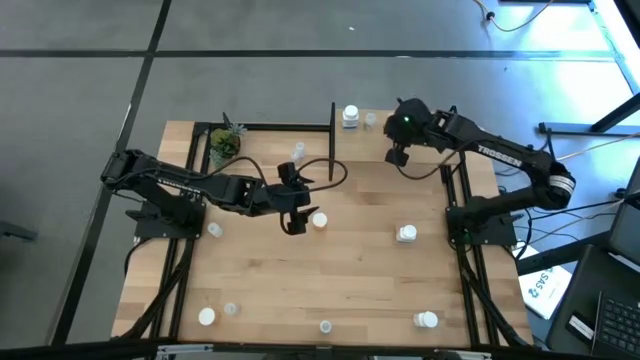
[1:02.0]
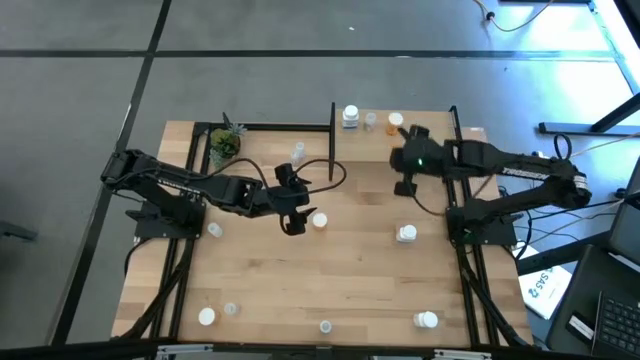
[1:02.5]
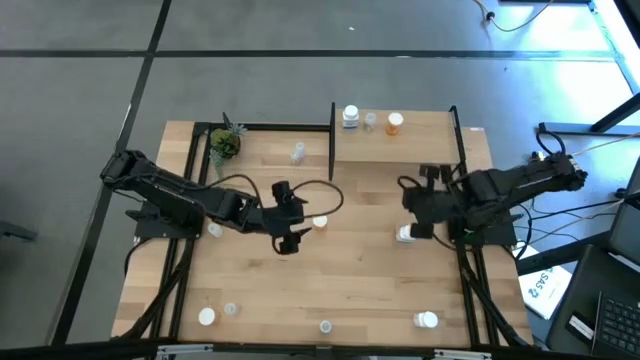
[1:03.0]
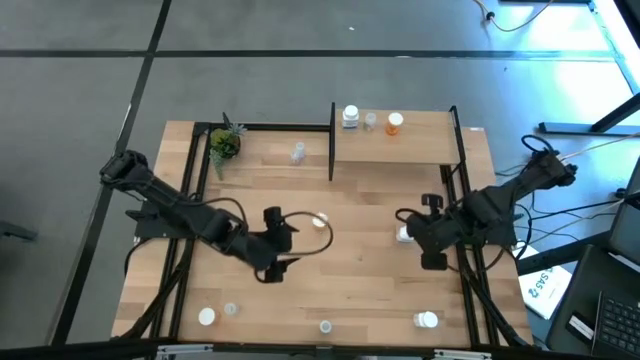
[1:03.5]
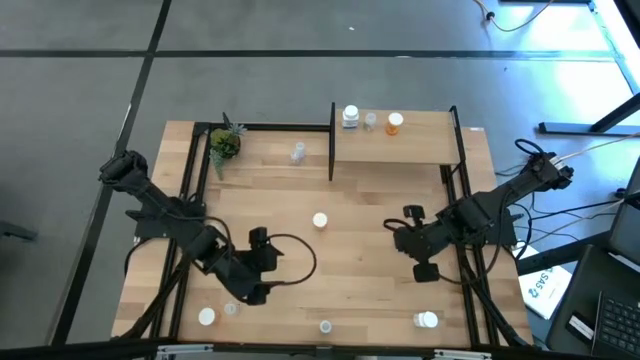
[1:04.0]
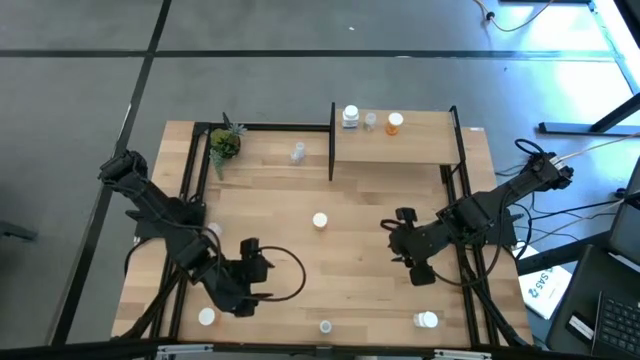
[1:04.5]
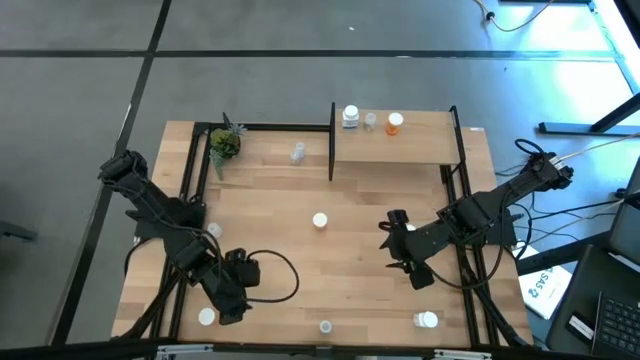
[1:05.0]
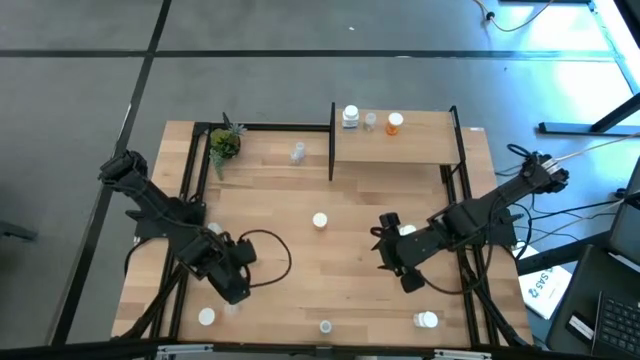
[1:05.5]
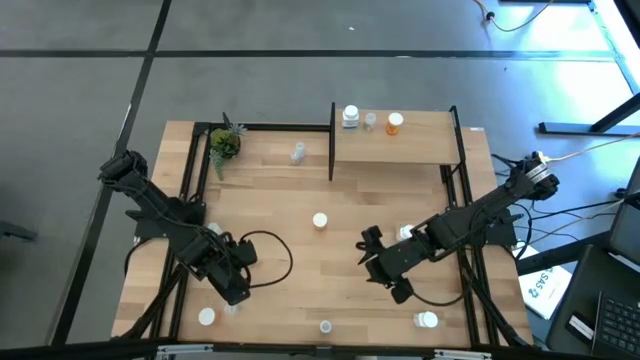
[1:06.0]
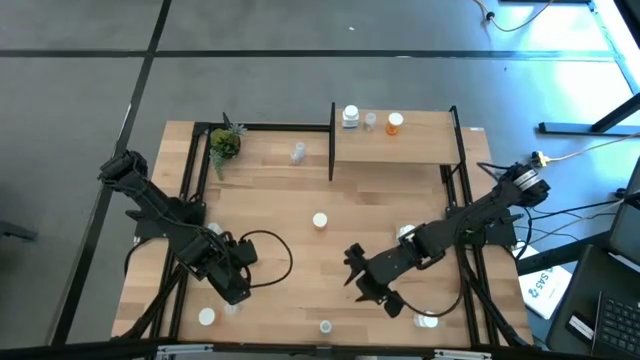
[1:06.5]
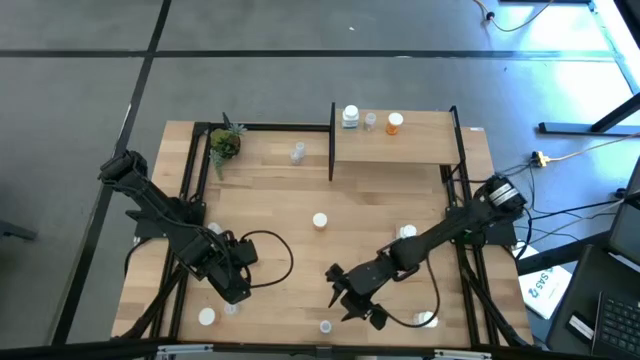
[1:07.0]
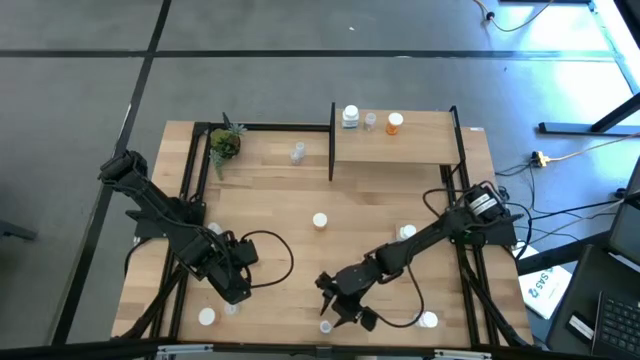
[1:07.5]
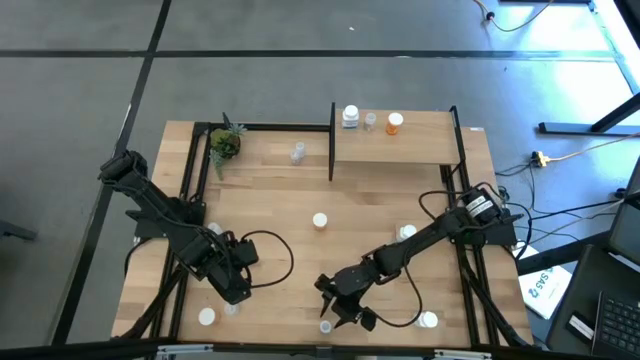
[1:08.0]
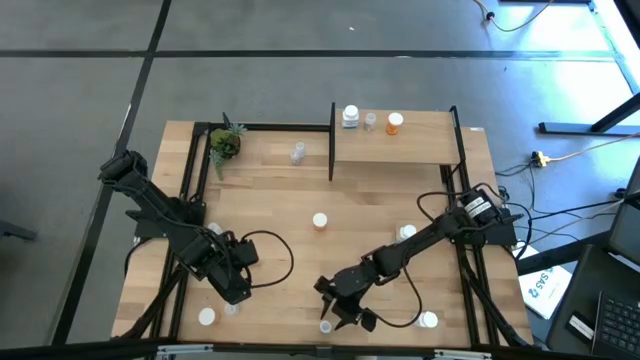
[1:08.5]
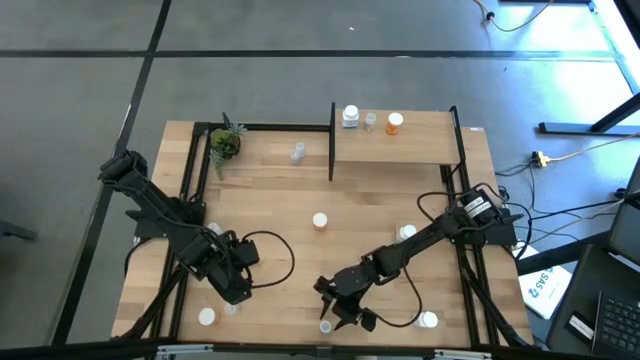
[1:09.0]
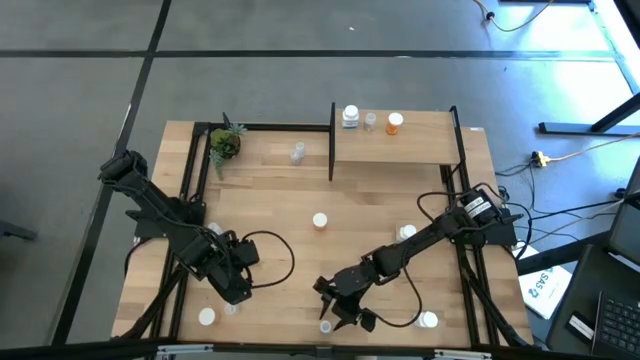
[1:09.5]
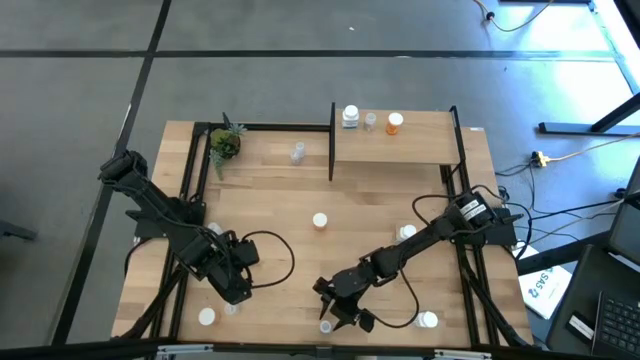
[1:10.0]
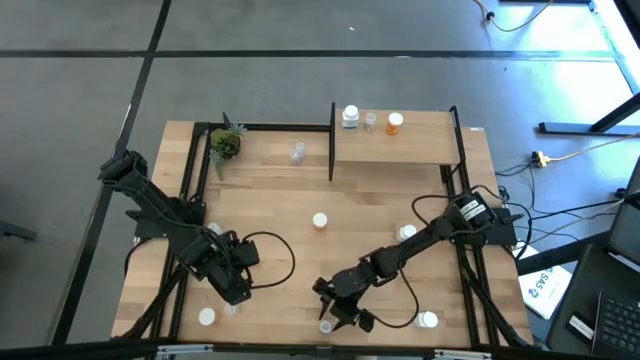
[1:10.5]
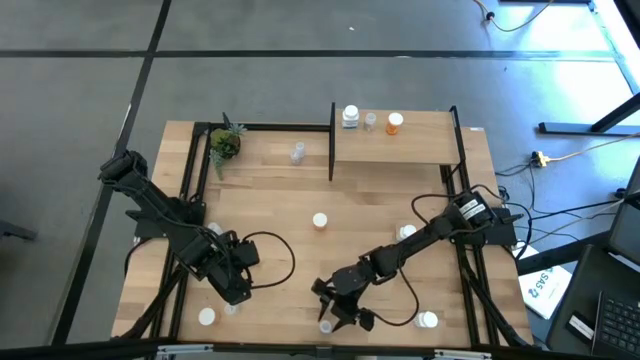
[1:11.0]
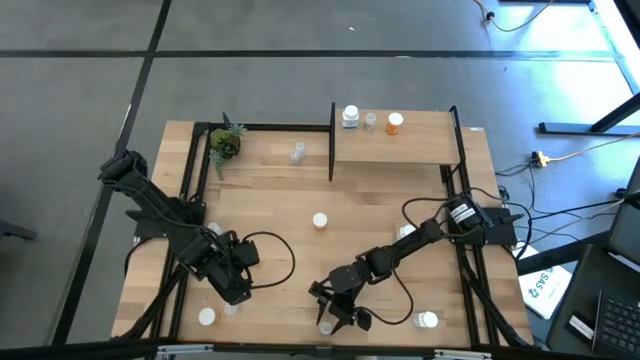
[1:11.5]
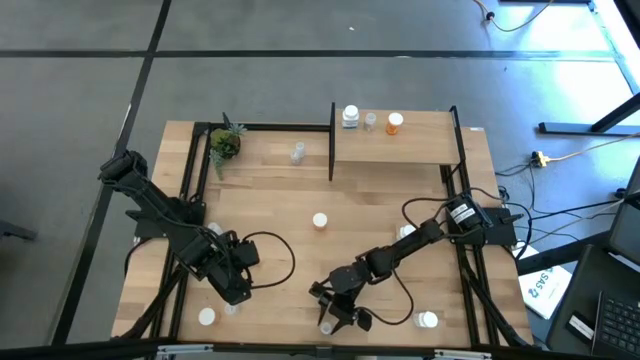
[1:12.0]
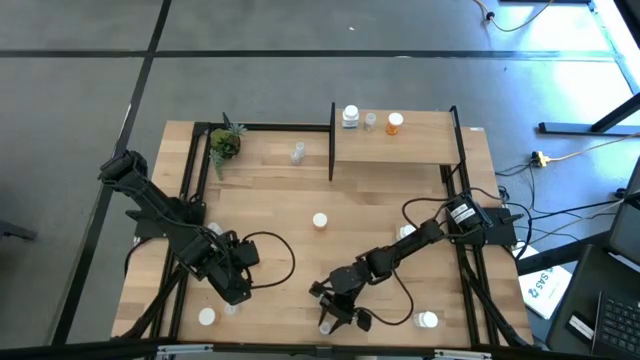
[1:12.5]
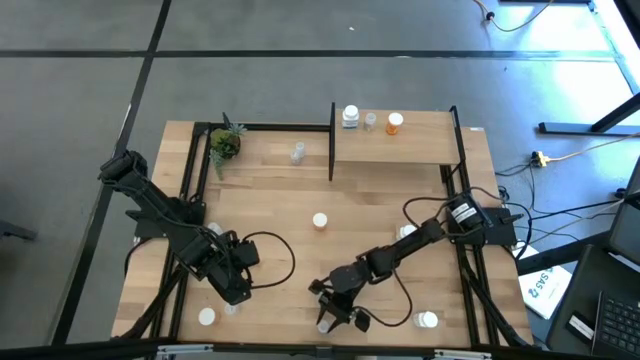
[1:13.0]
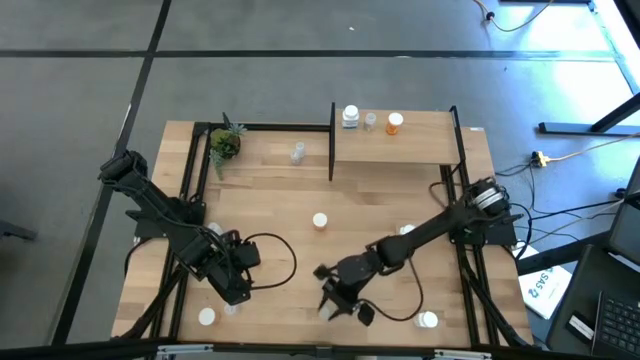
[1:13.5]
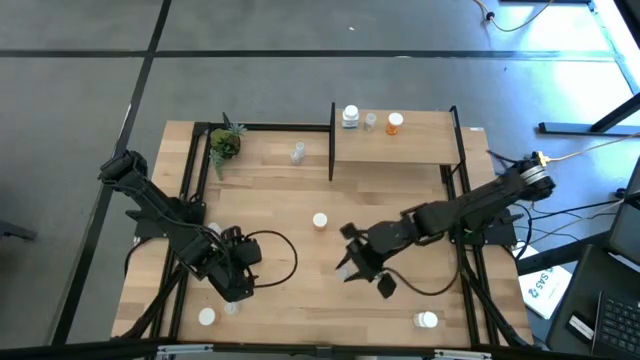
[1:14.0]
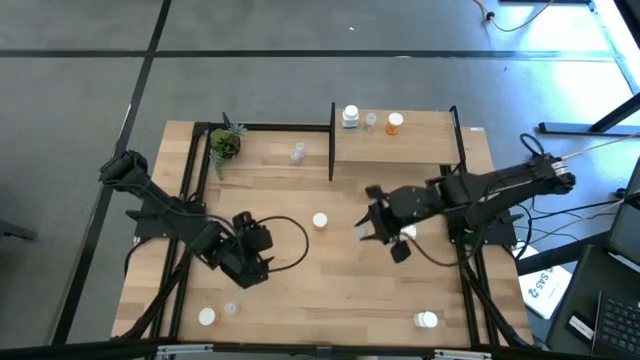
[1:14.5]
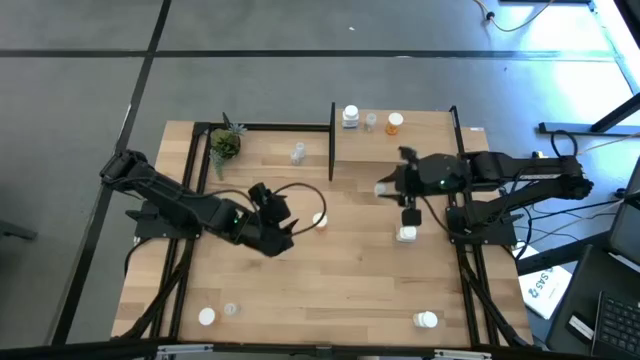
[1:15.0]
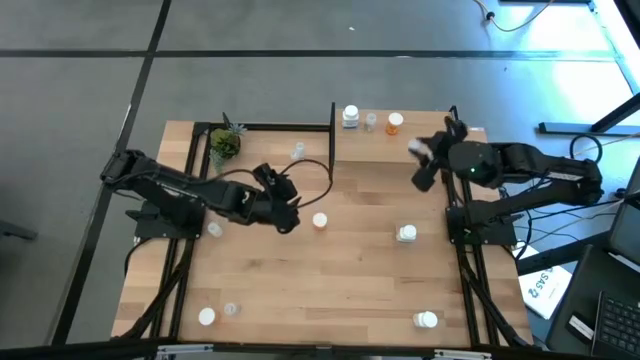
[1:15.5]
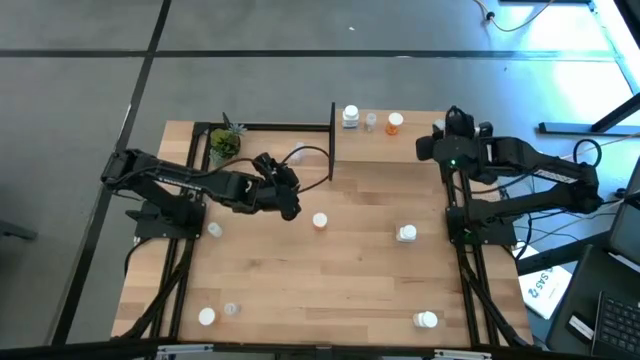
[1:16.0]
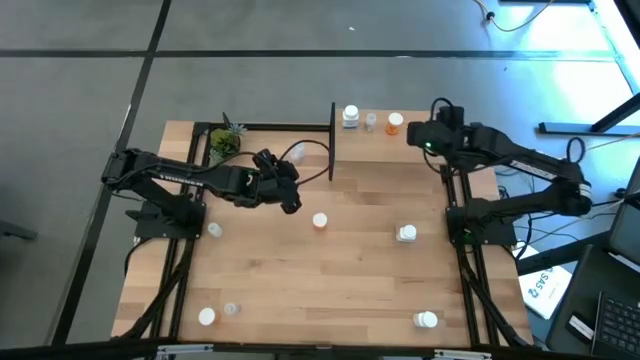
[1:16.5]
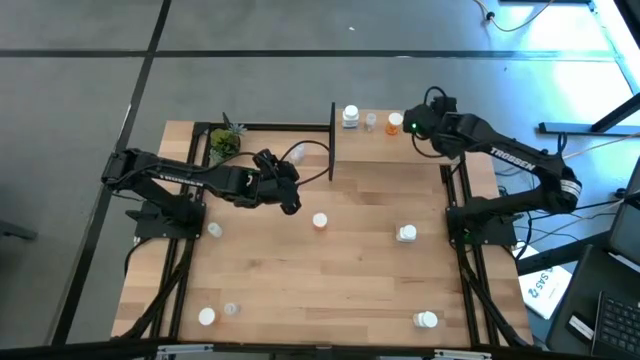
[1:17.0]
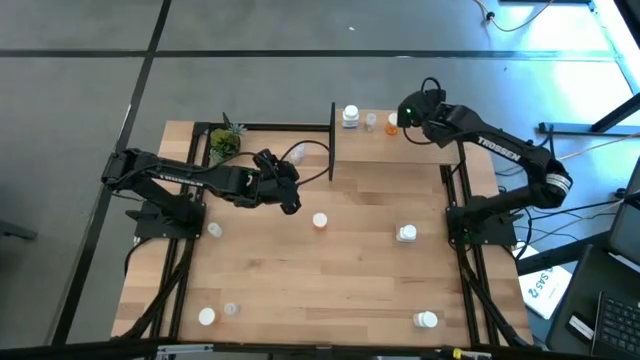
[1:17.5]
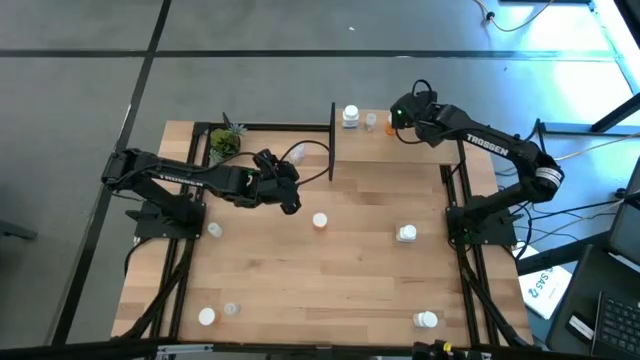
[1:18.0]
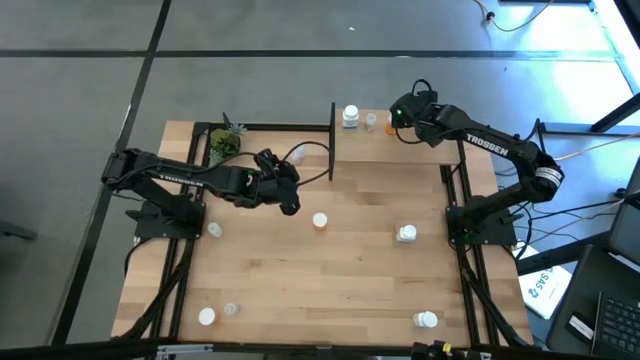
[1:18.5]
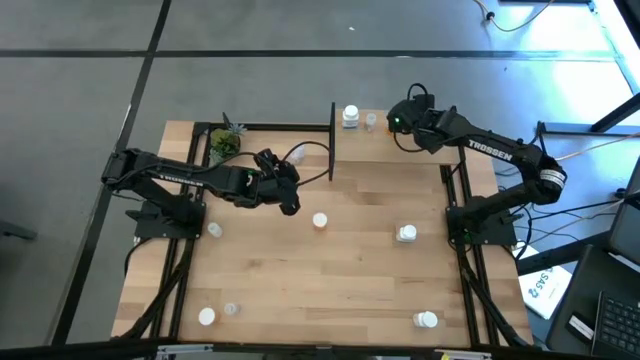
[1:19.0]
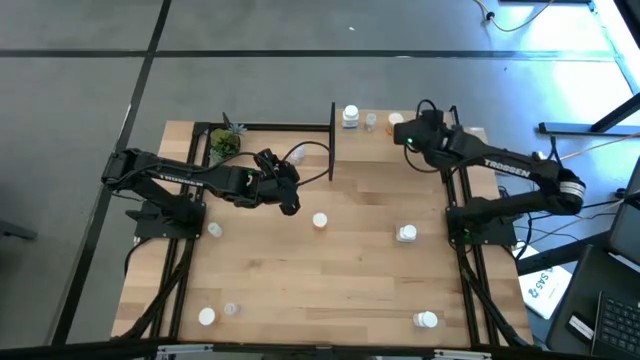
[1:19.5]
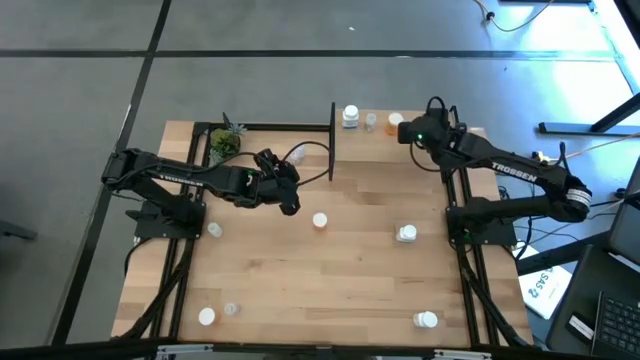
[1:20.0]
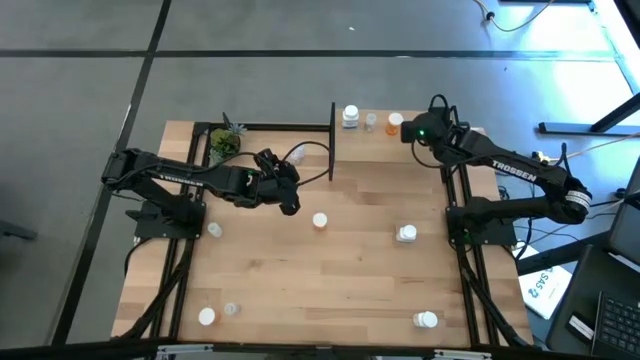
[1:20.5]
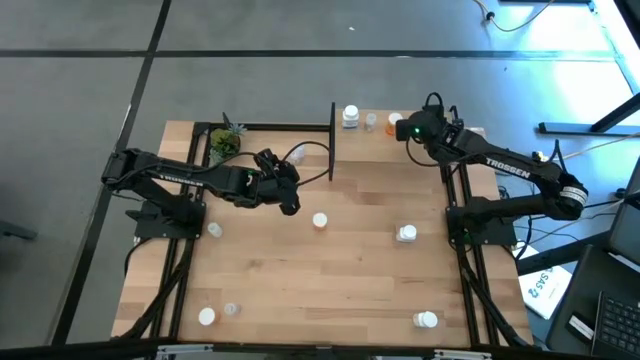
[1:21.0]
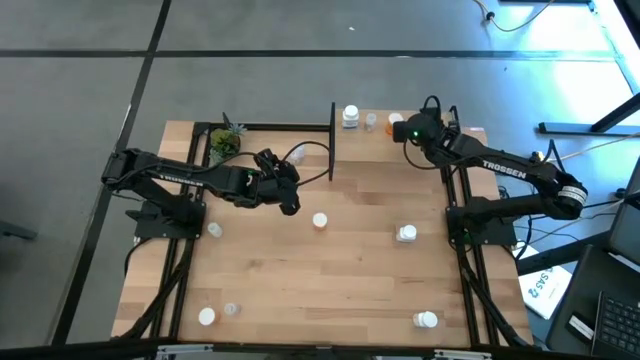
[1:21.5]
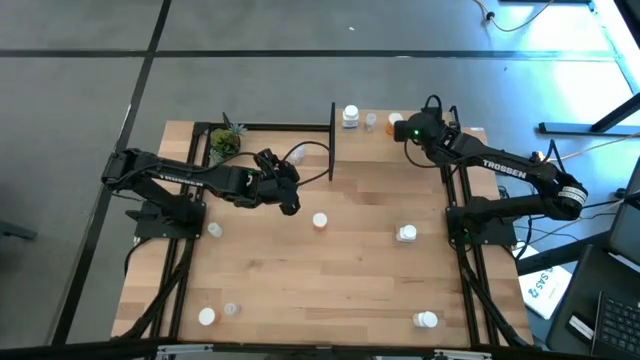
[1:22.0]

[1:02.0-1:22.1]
Task: Pick and place medicine bottles onto shelf by color
Put the bottom yellow transparent pill bottle on the shelf

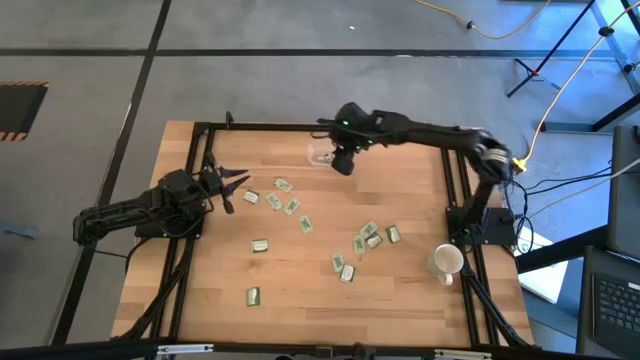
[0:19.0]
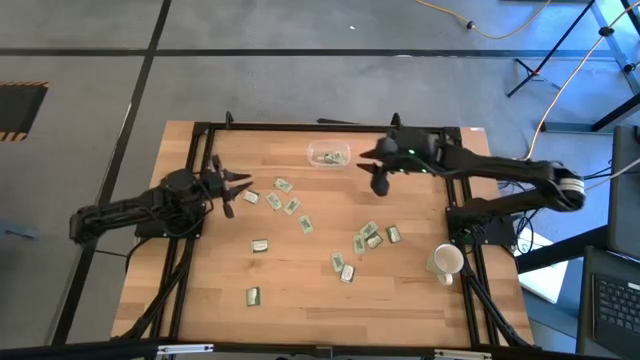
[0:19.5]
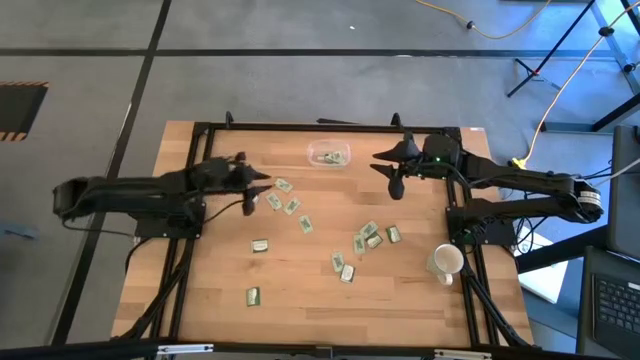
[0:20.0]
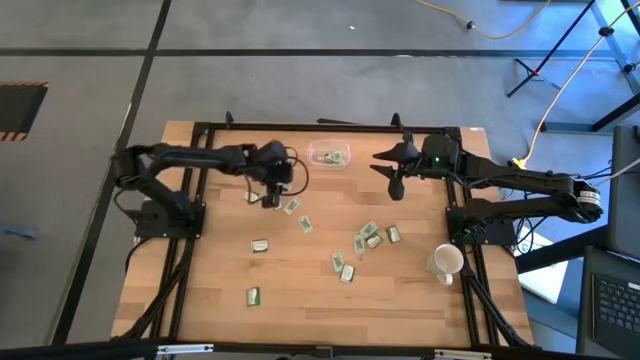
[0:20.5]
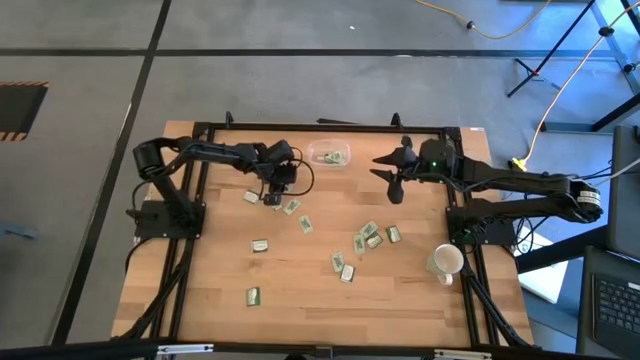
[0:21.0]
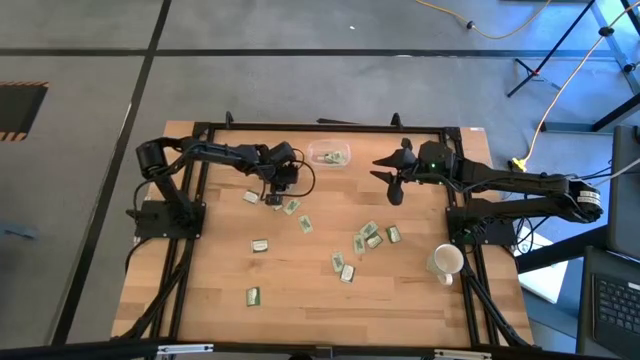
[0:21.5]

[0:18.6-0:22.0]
Task: Pick and place items into bin
Put the white stevia packet into the transparent bin
